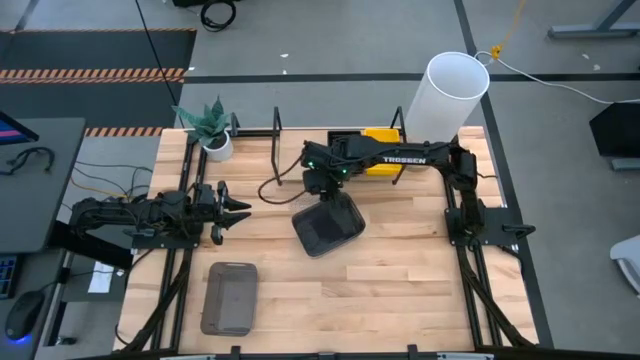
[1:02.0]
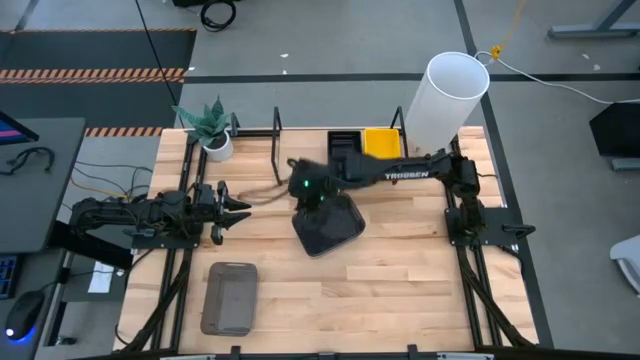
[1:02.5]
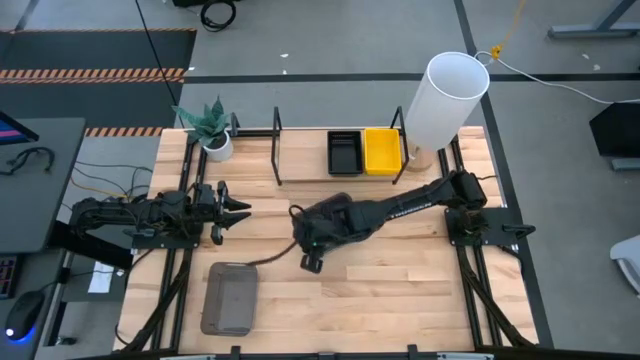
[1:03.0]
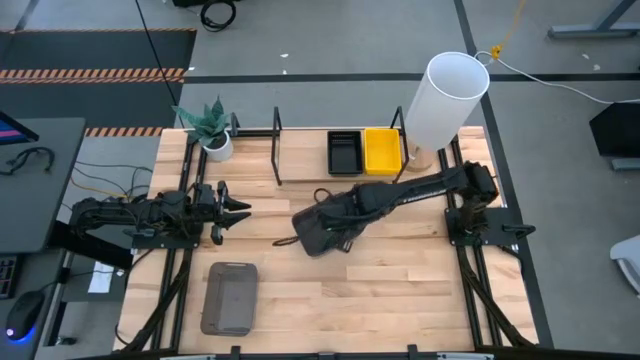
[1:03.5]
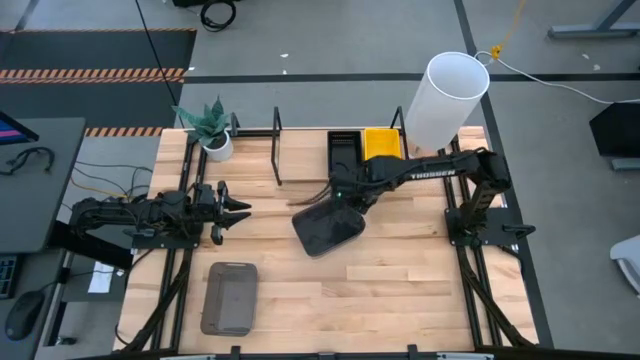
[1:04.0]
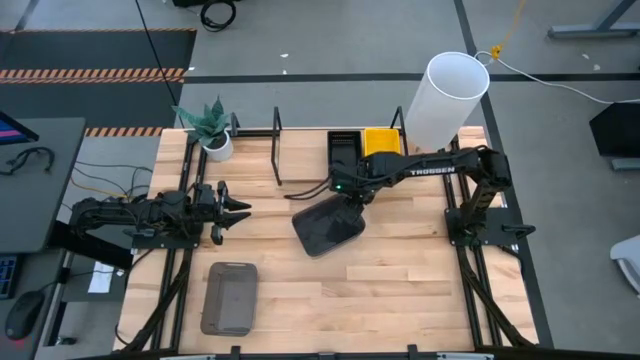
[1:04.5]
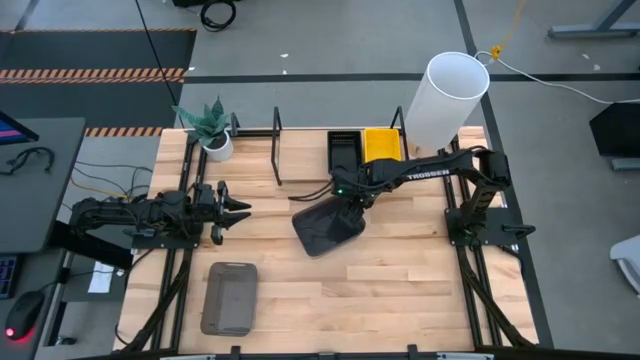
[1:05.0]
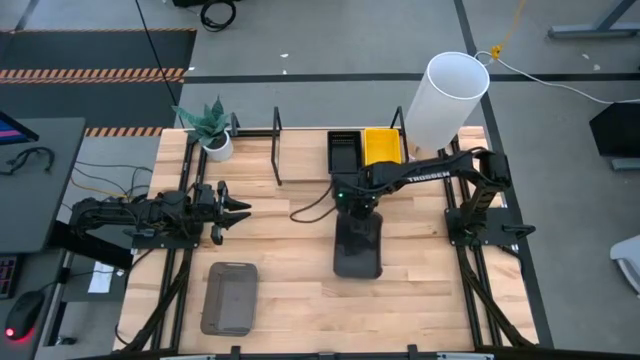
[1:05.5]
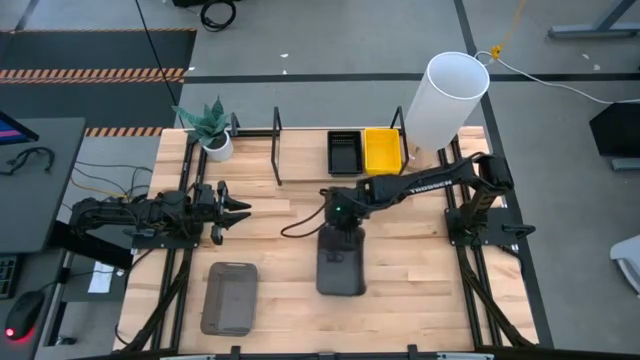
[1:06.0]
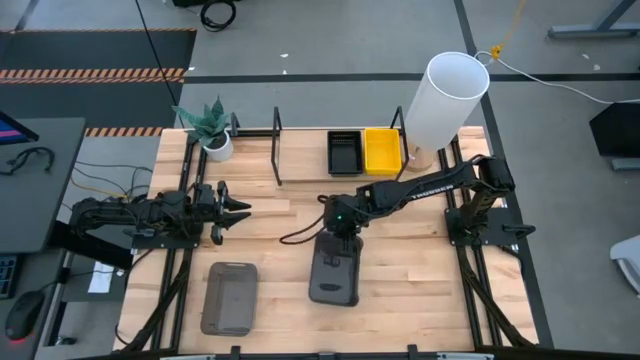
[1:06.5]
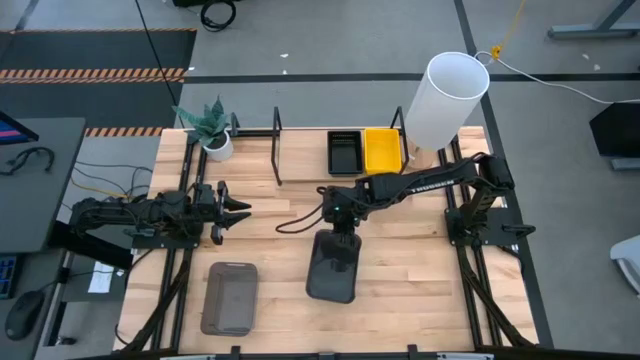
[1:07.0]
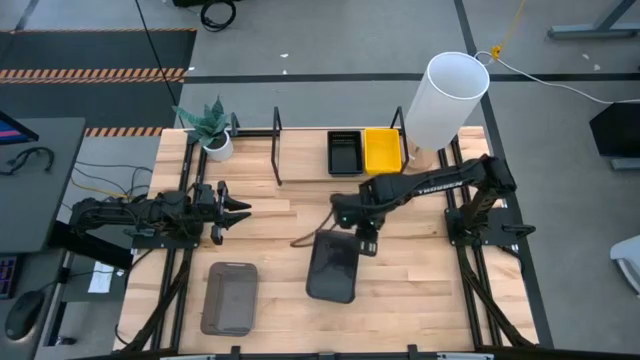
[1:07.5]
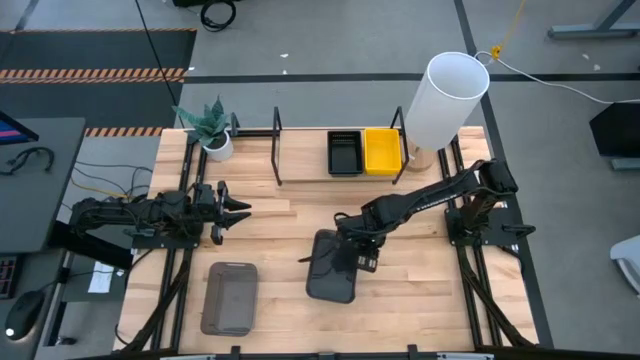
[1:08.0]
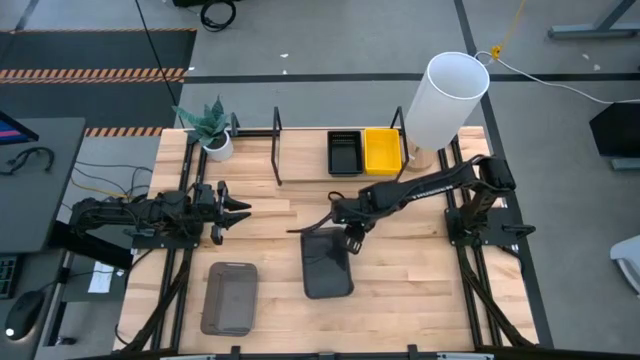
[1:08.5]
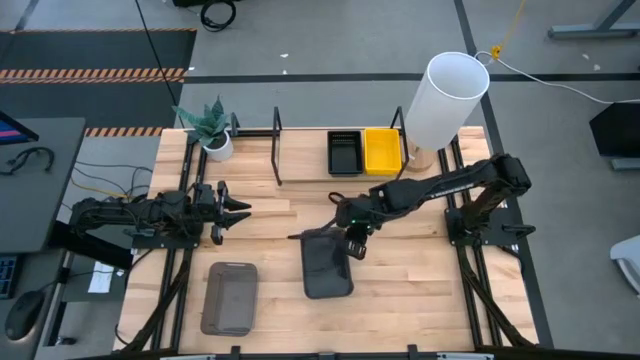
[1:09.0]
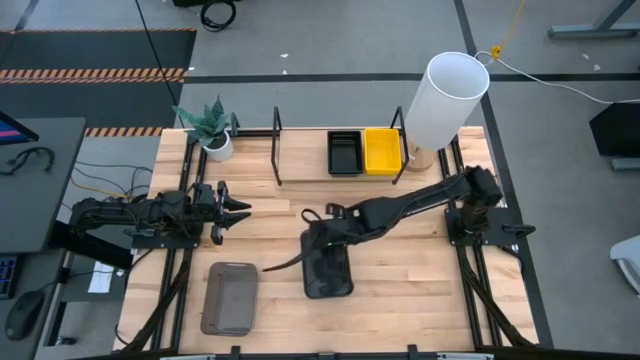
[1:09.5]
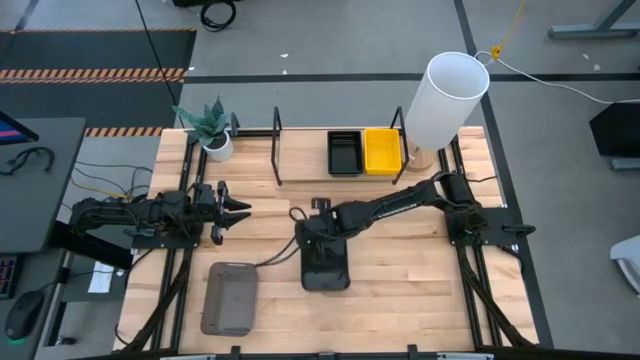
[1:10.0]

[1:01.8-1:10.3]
Task: Stack baskets on shelf by color
Move the stacked gray bins to the center of the table

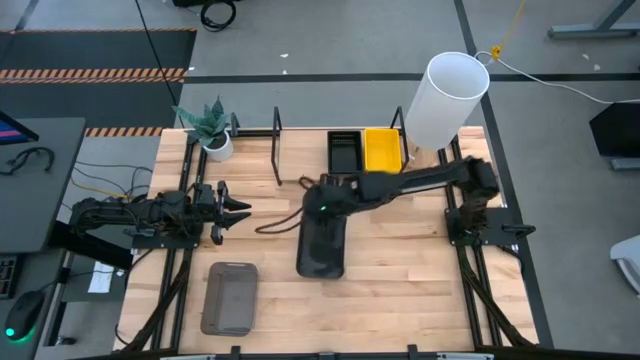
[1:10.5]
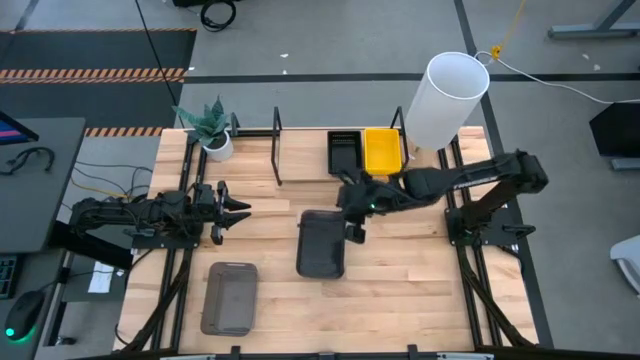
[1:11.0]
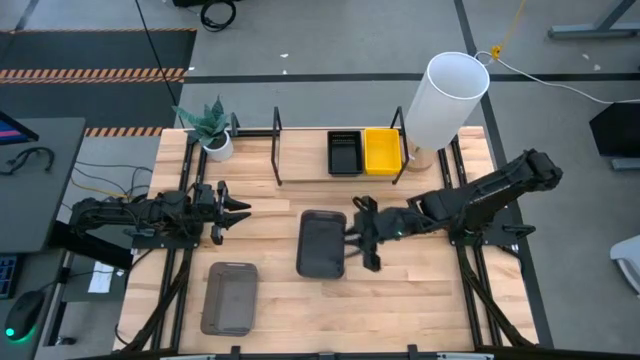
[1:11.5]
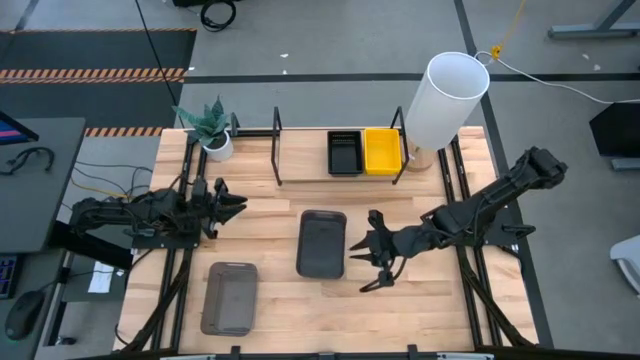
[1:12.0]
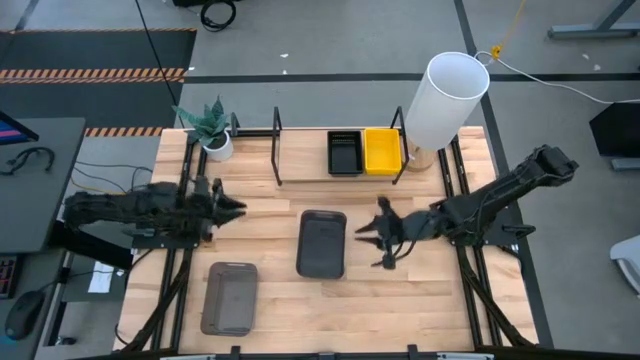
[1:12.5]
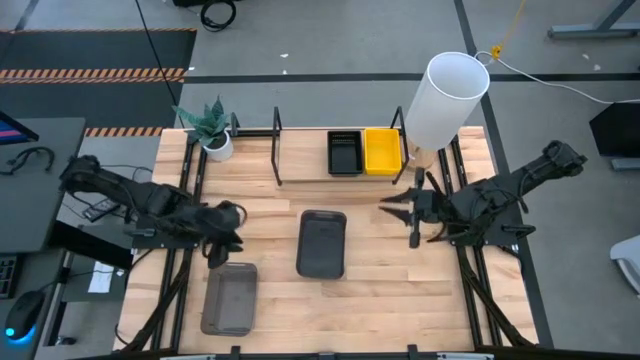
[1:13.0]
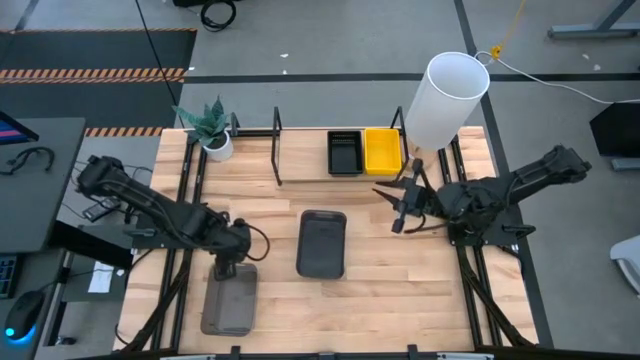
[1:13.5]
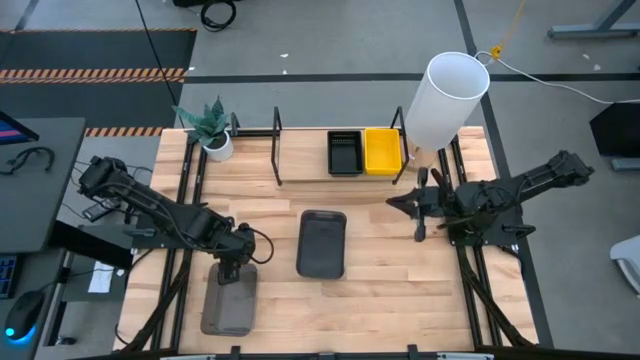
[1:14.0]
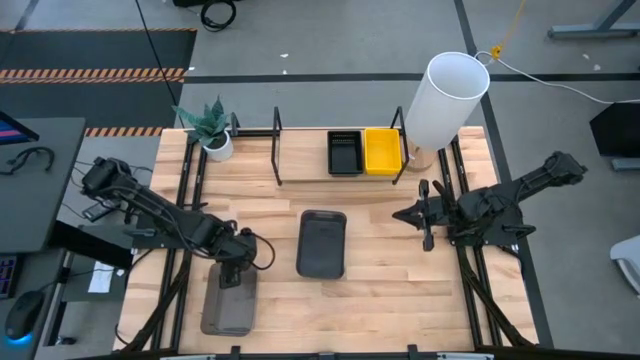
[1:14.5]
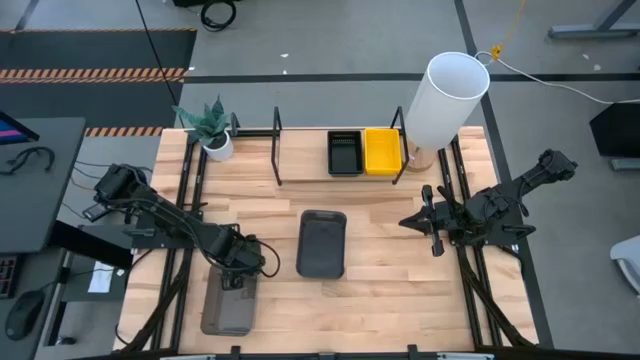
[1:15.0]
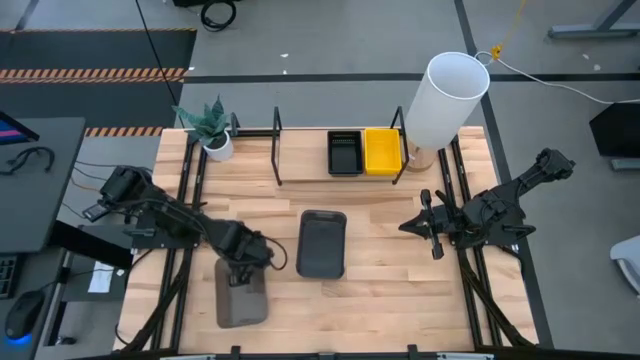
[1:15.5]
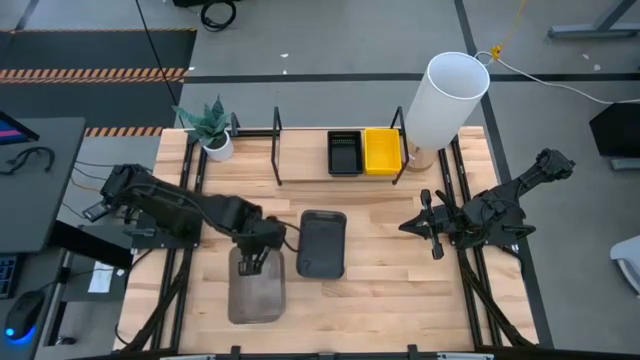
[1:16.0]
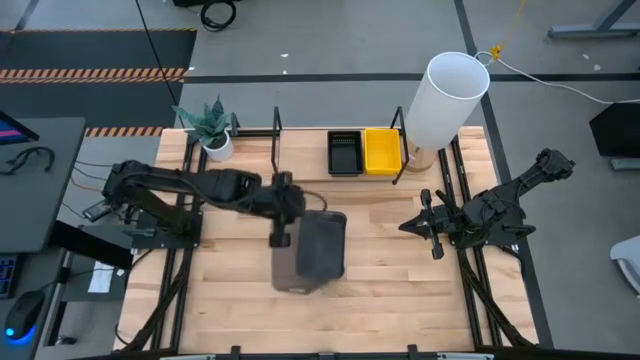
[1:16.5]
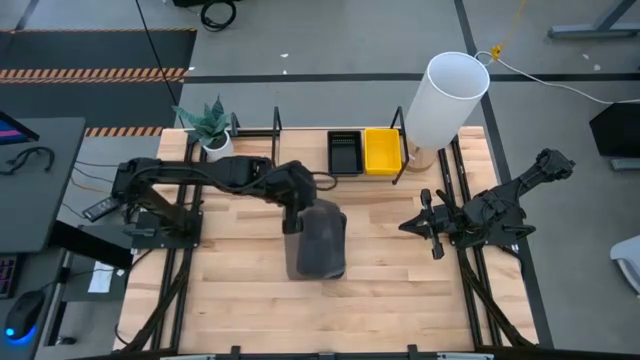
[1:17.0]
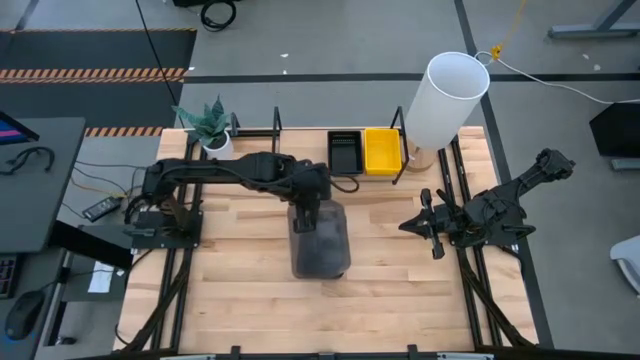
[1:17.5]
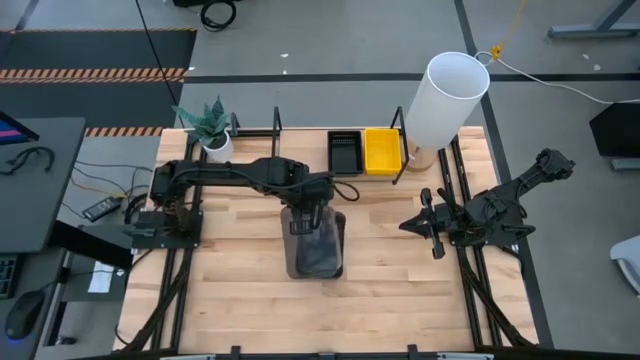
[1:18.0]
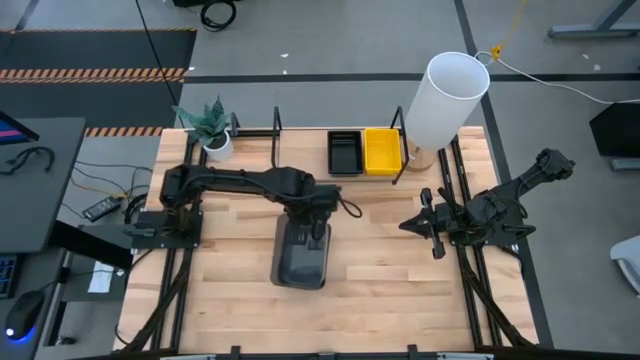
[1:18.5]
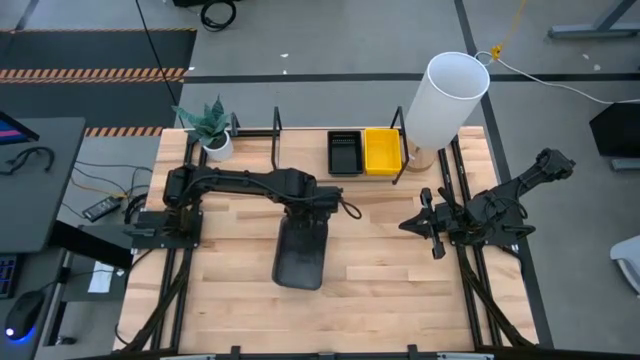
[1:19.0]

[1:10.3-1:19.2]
Stack the bottom gray bin on top of the top gray bin

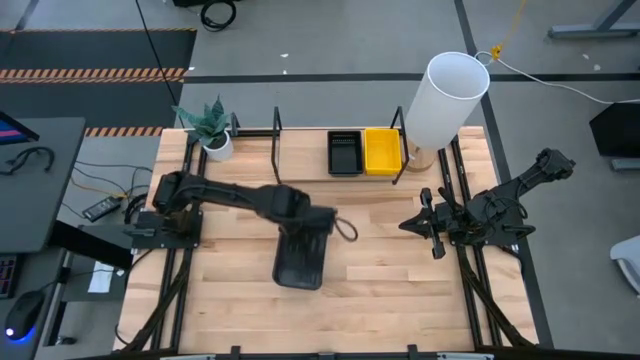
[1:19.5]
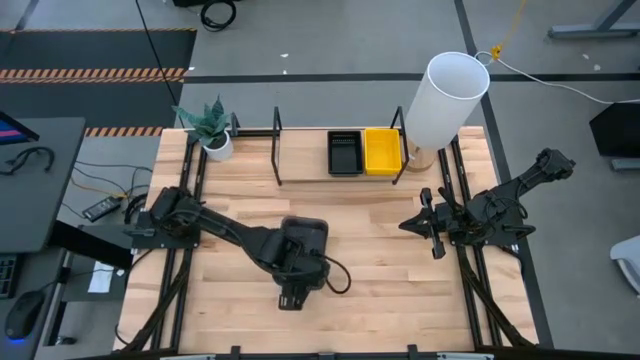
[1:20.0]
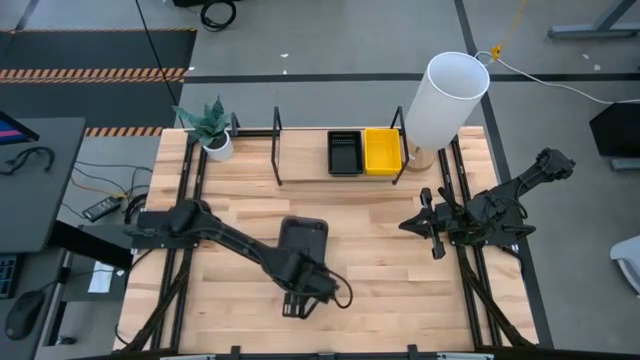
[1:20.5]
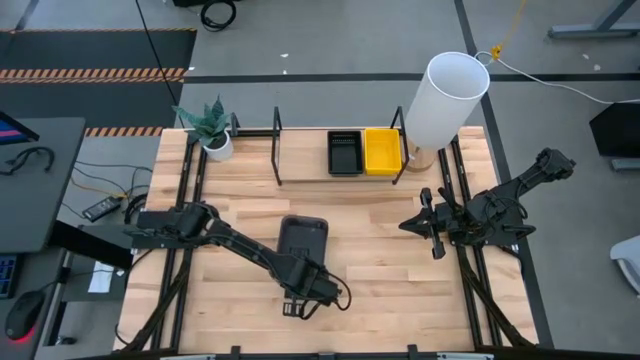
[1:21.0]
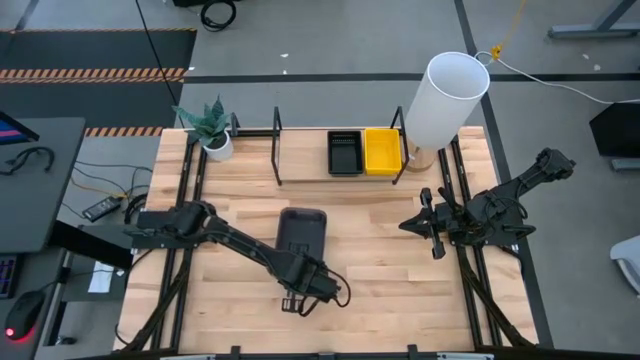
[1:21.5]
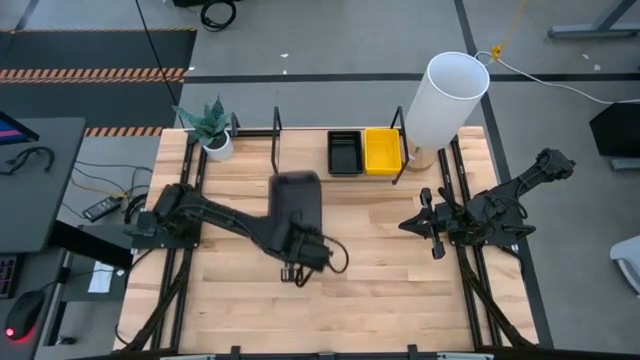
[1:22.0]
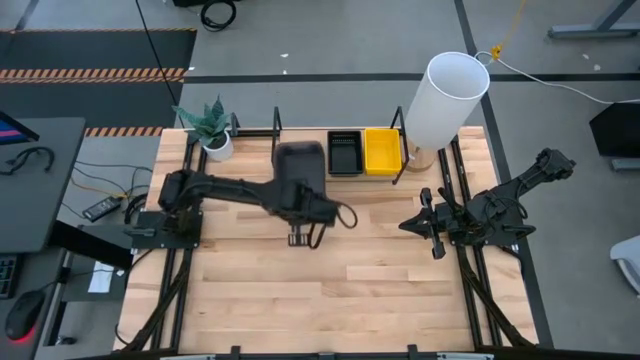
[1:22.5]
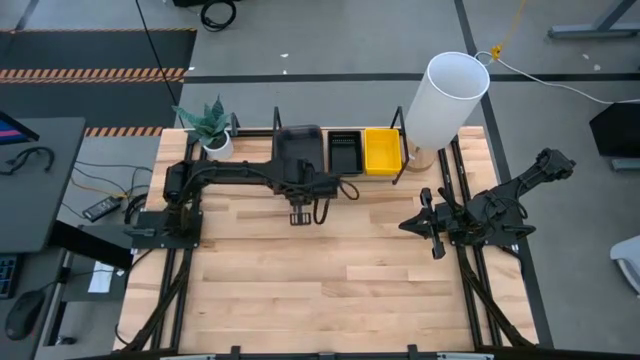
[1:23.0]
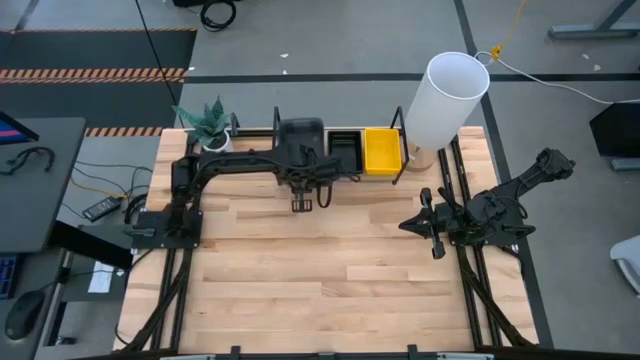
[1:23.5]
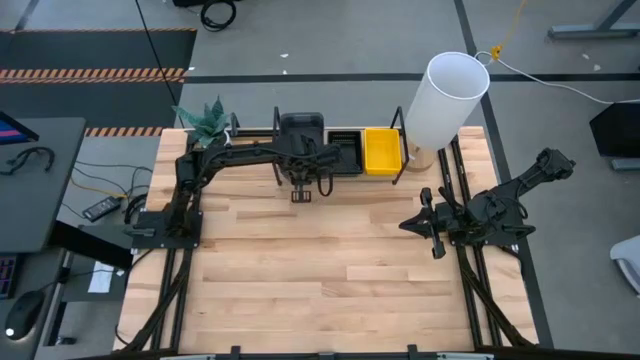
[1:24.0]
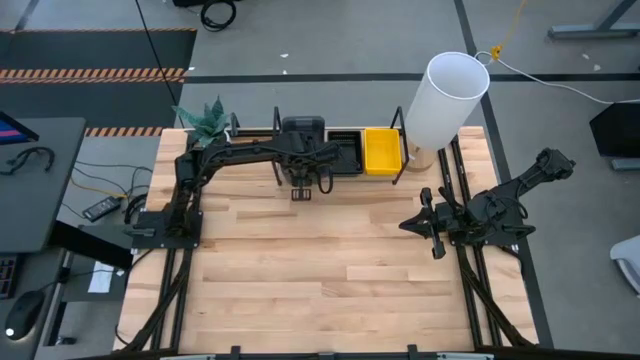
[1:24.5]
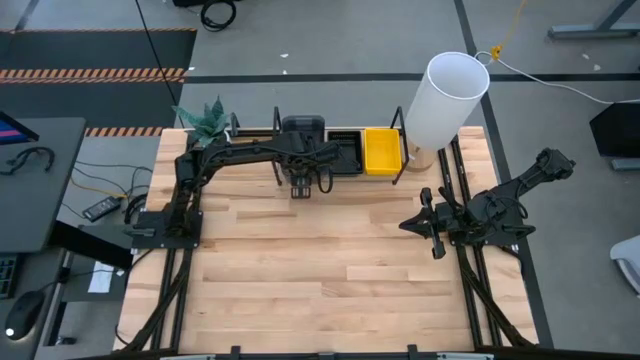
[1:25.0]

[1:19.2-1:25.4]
Put the stacked gray bins on the shelf
